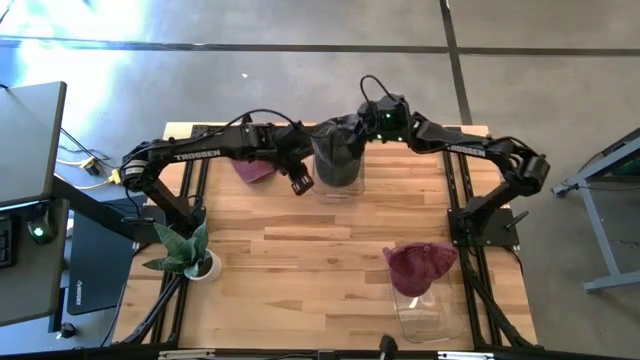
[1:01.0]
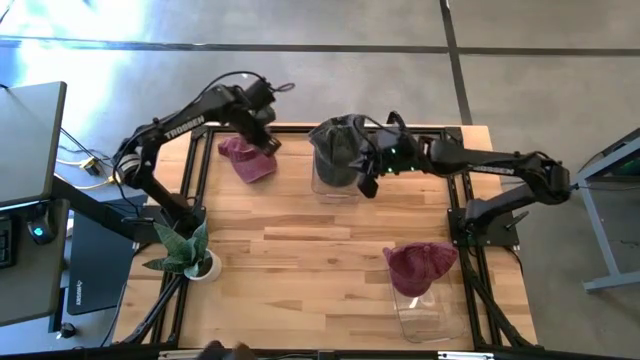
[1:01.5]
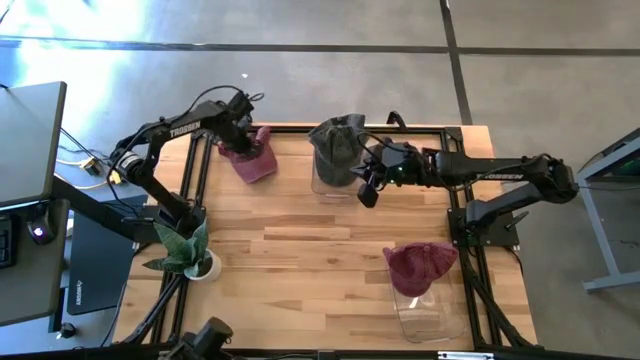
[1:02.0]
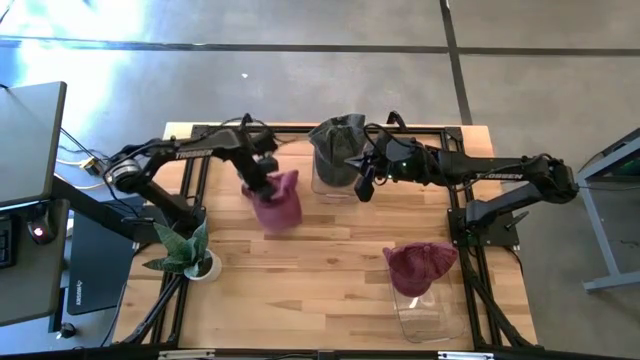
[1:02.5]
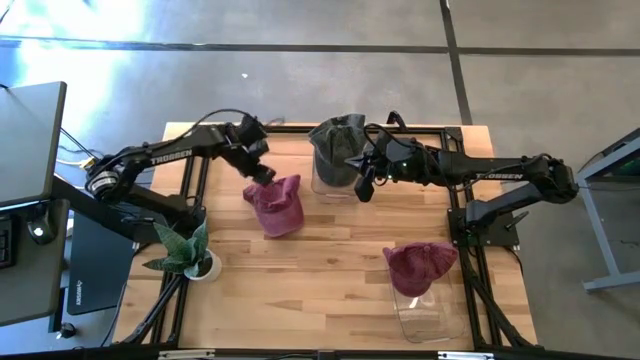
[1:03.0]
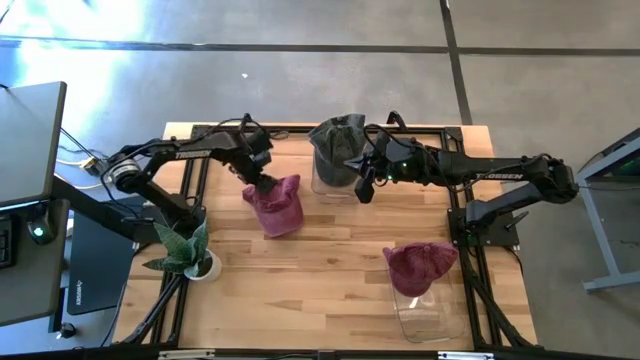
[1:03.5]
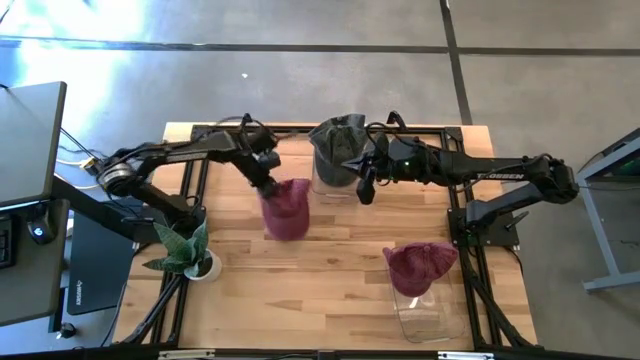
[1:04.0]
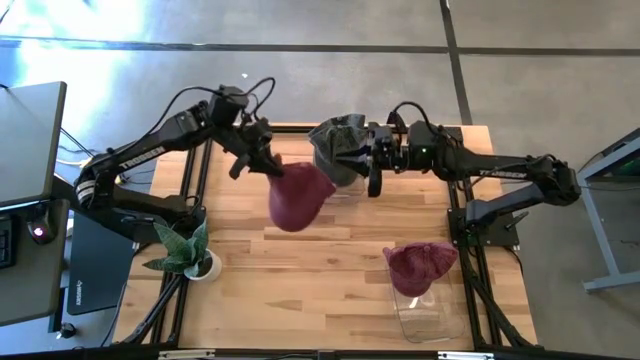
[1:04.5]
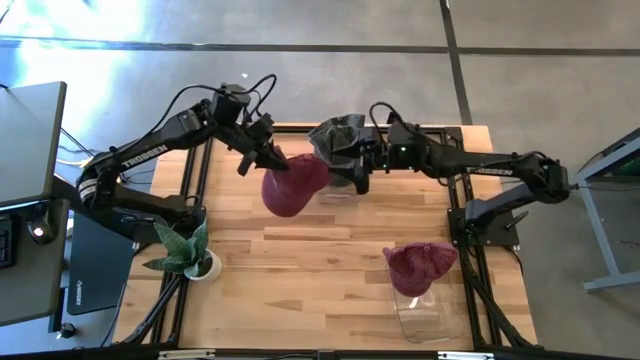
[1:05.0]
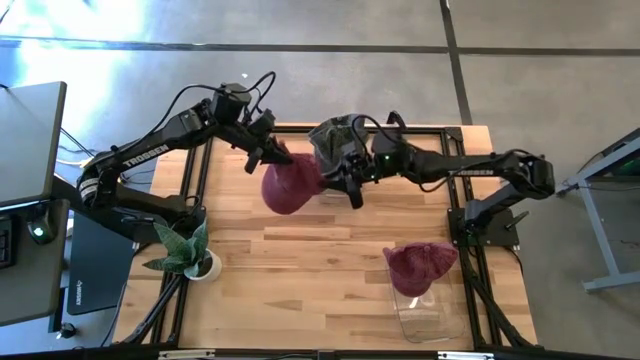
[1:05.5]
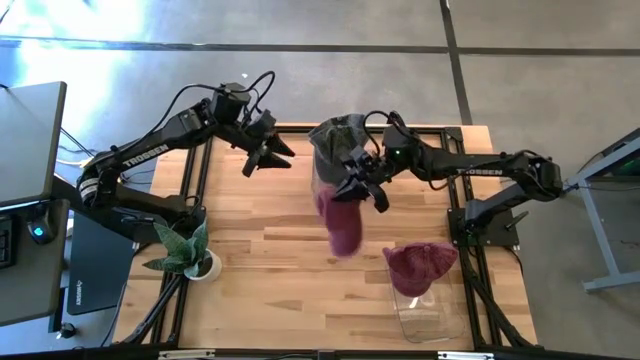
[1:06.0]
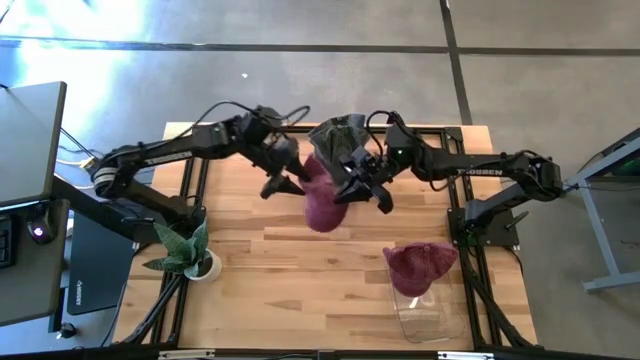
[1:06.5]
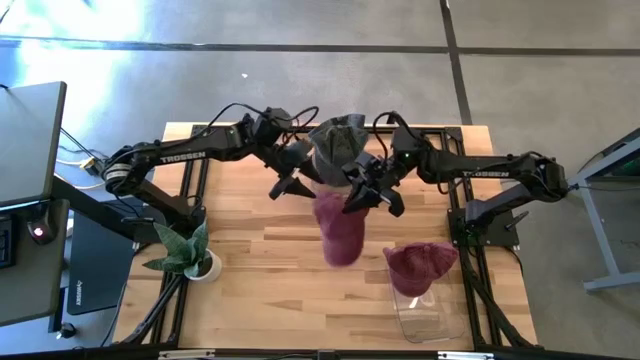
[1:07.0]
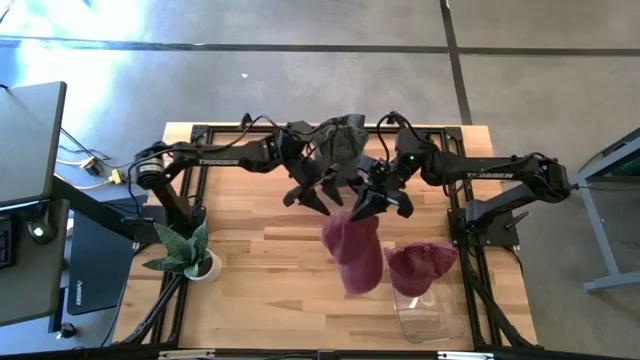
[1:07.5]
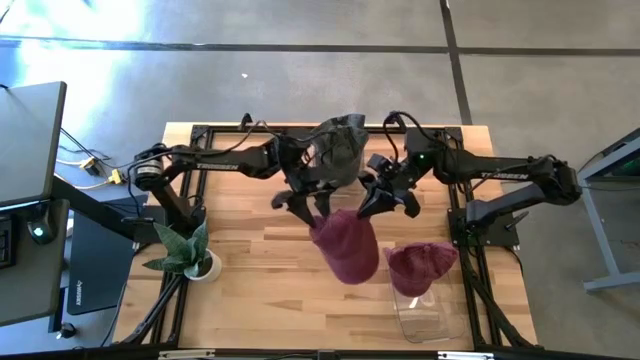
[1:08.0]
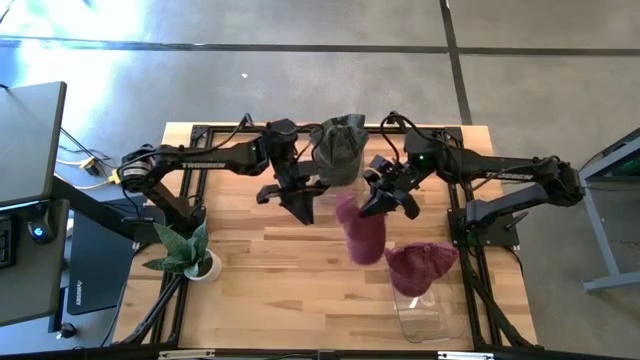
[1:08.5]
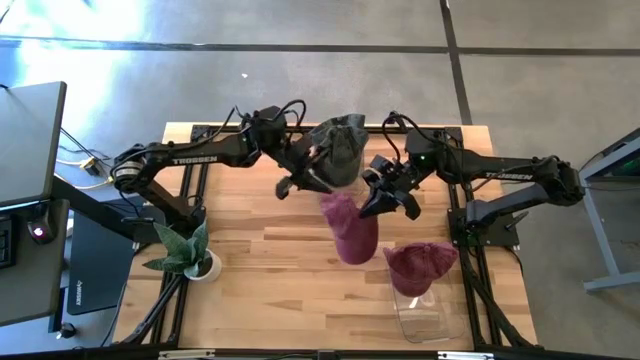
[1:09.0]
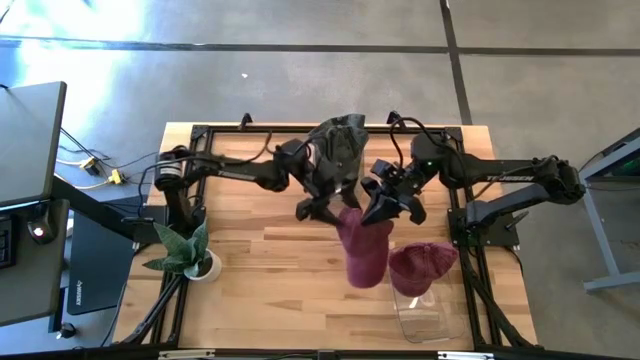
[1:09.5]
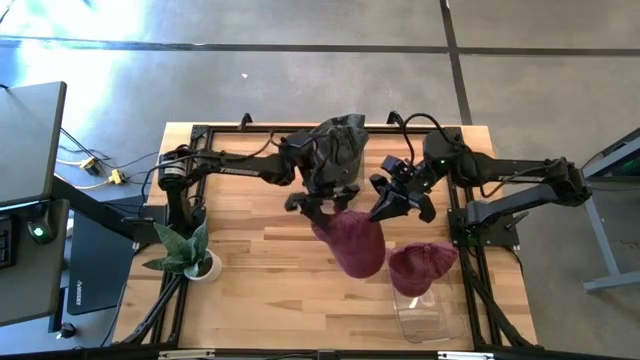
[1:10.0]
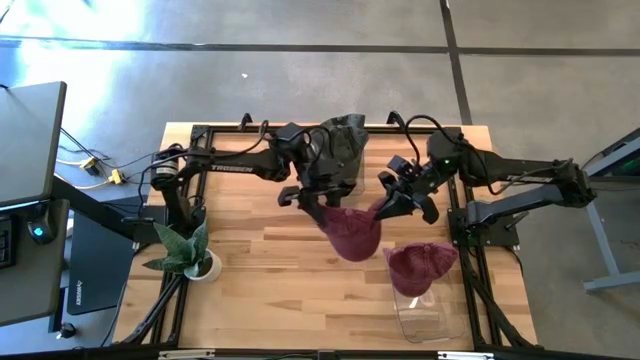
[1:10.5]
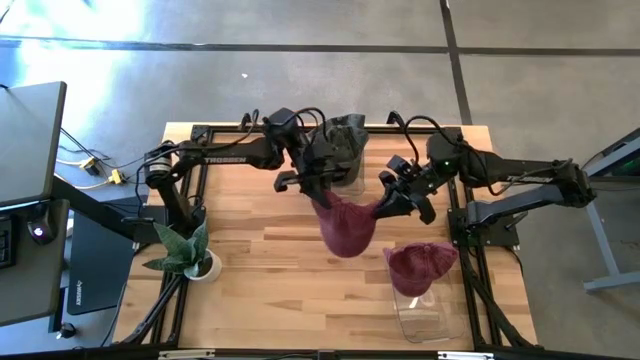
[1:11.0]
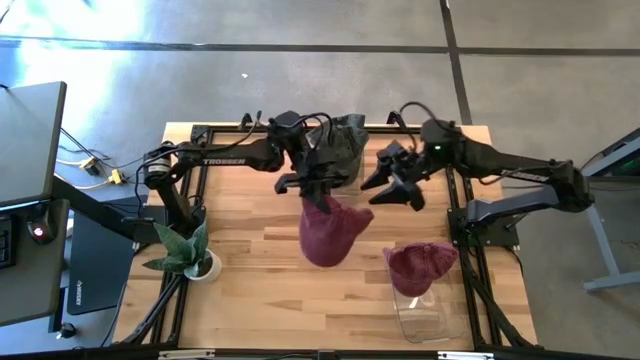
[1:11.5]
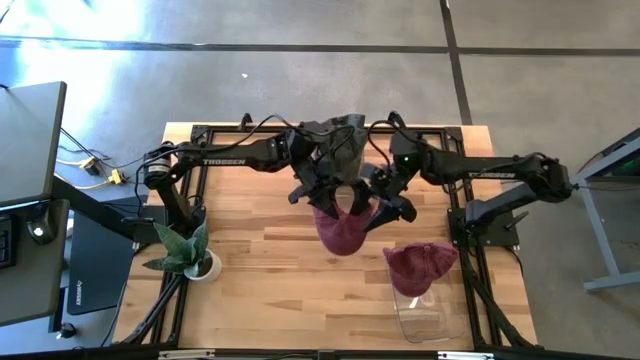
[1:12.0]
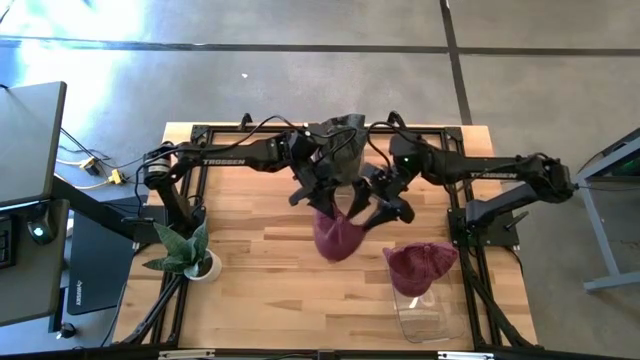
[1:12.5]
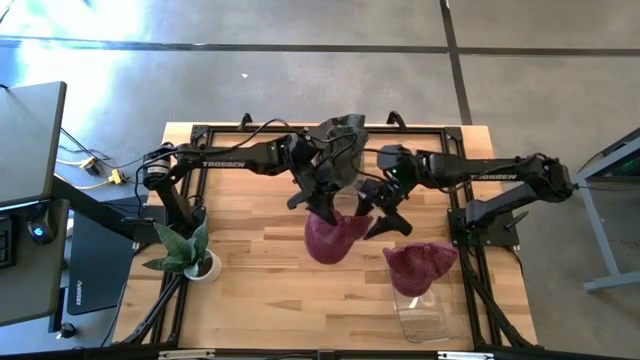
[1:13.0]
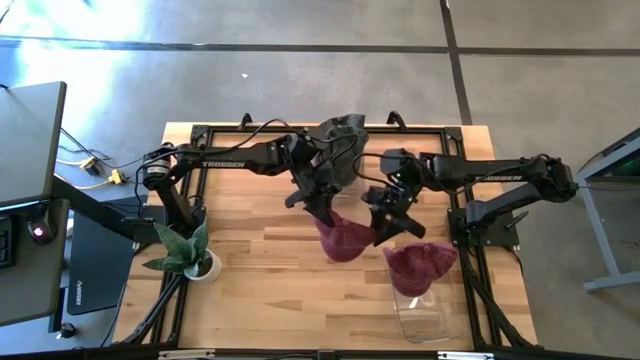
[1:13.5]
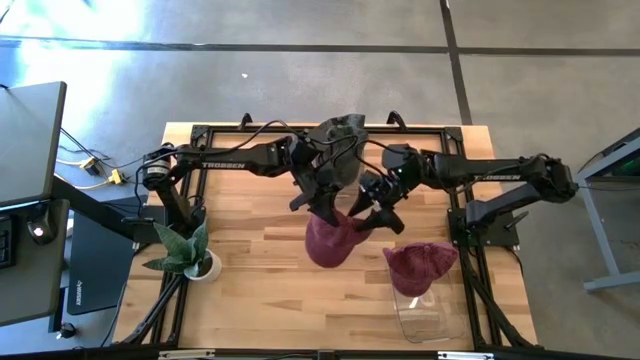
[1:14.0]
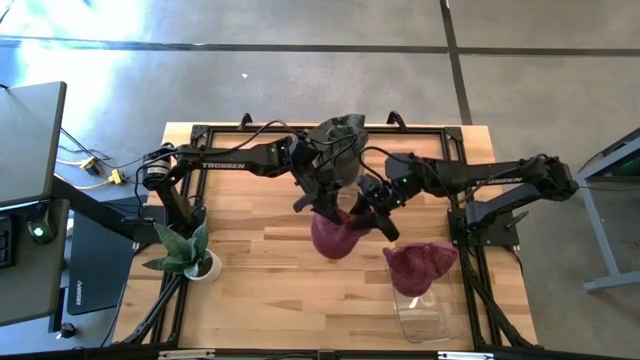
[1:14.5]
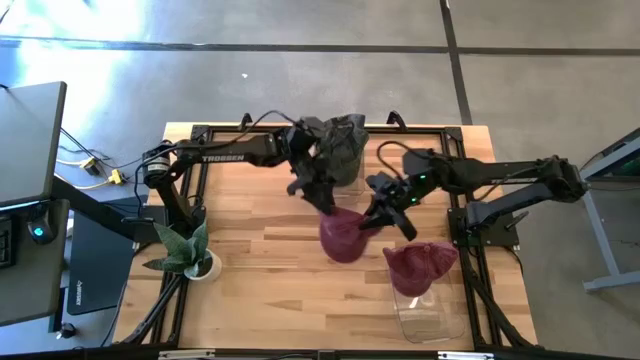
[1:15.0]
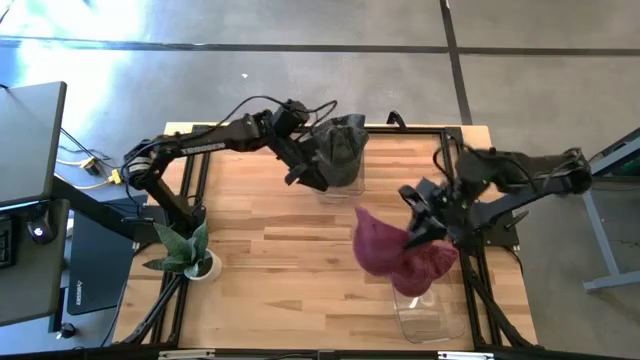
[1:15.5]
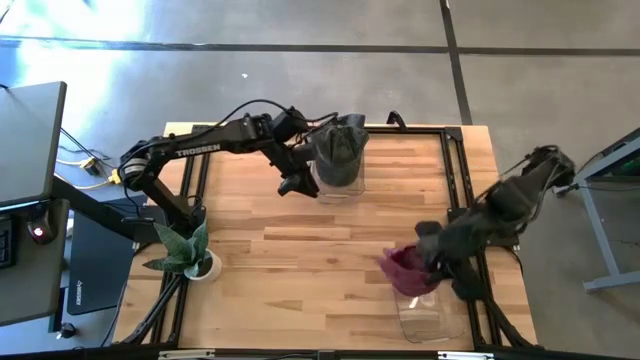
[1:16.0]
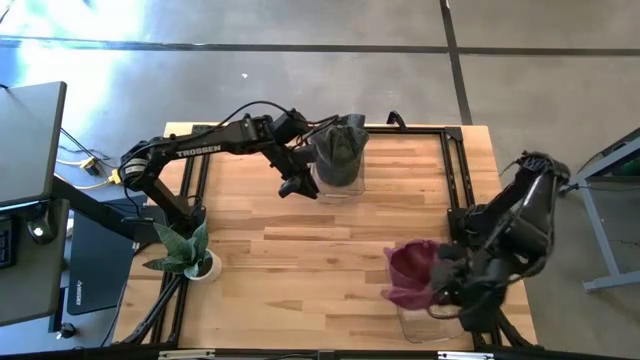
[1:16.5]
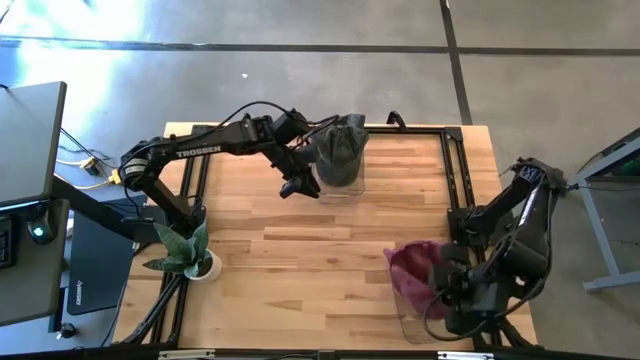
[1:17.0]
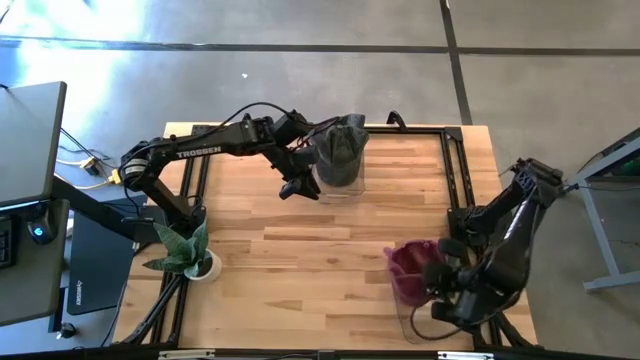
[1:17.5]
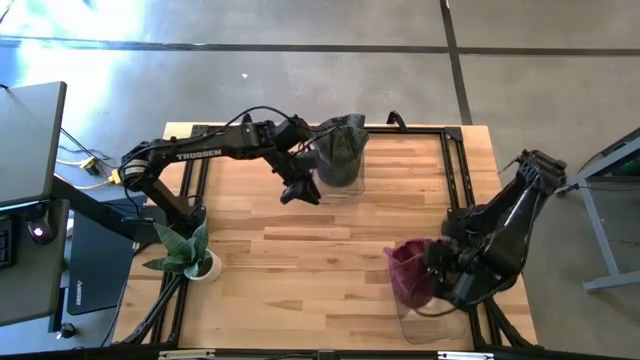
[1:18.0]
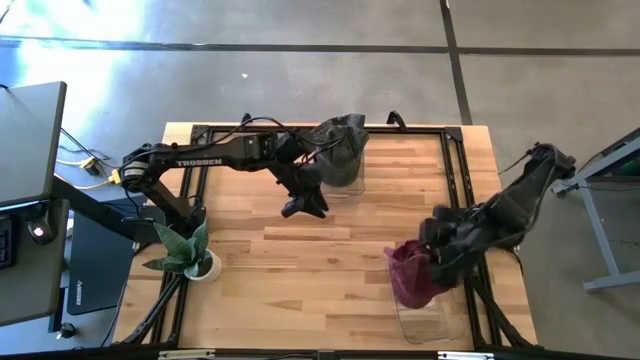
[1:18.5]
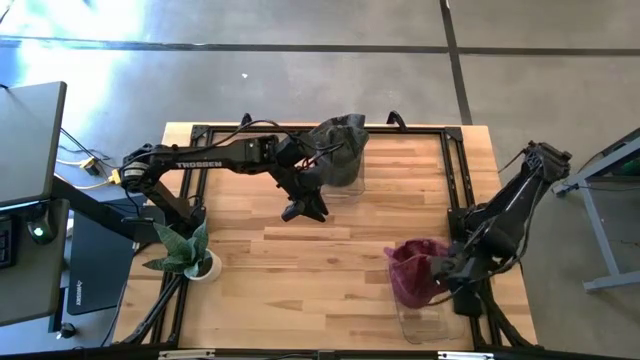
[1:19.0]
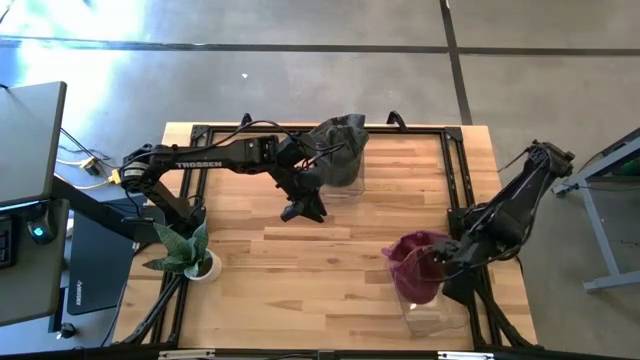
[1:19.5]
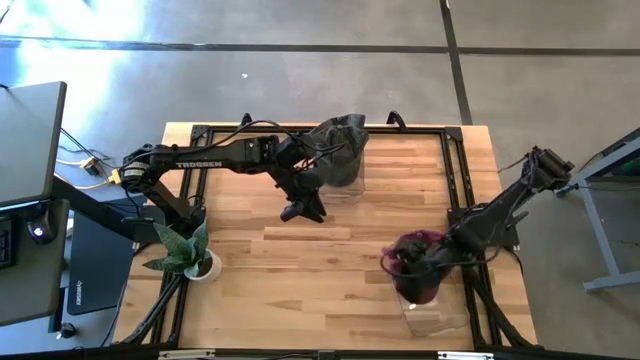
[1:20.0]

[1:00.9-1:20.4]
Task: Pick & Place hat
Put the red cap into the bottom transparent bin

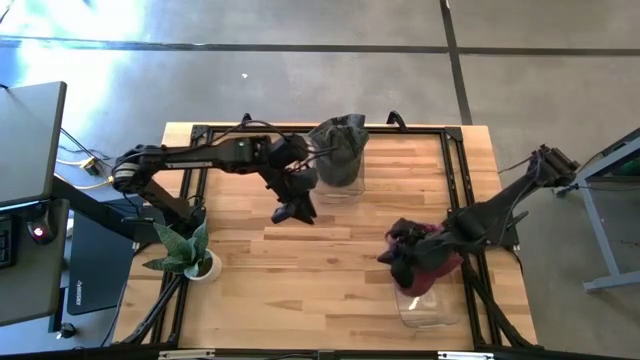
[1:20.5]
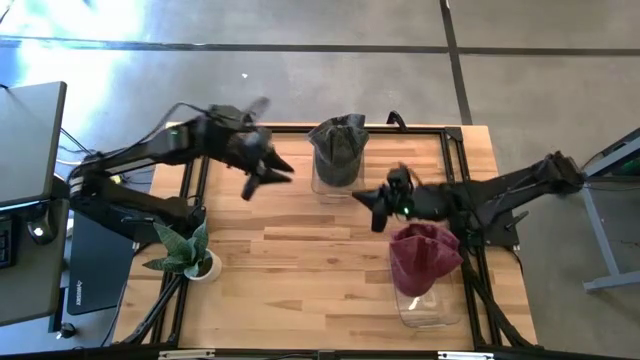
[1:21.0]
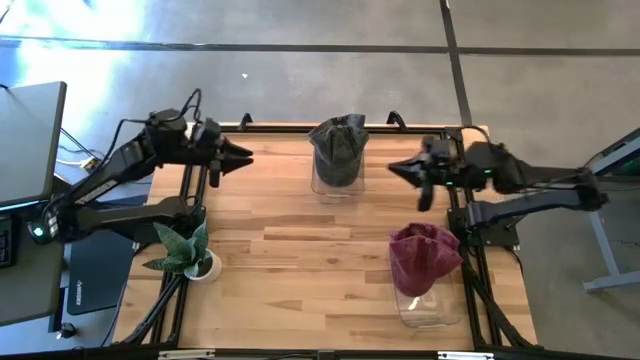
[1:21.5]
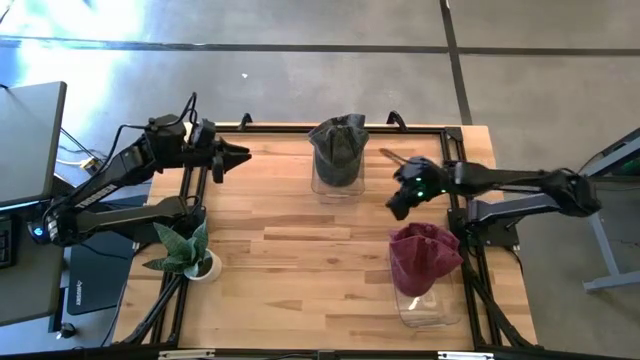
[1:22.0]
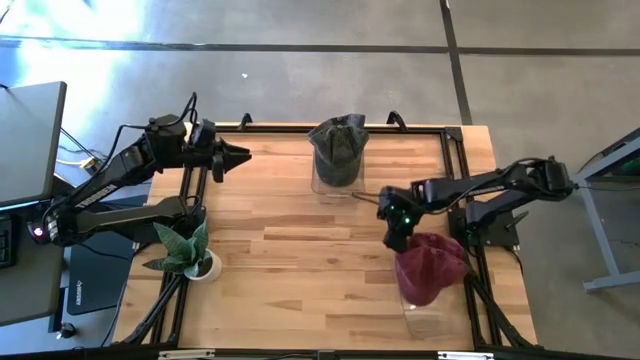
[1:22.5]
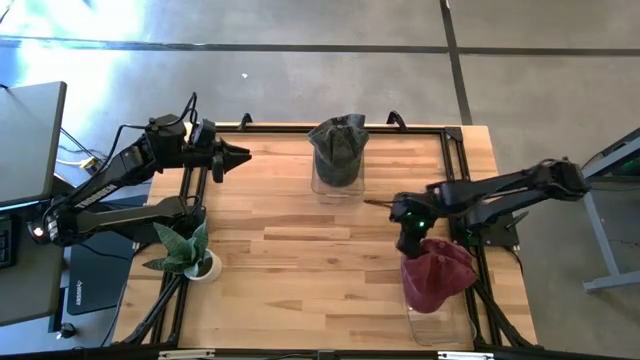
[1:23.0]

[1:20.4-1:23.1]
Adjust the bottom transparent bin

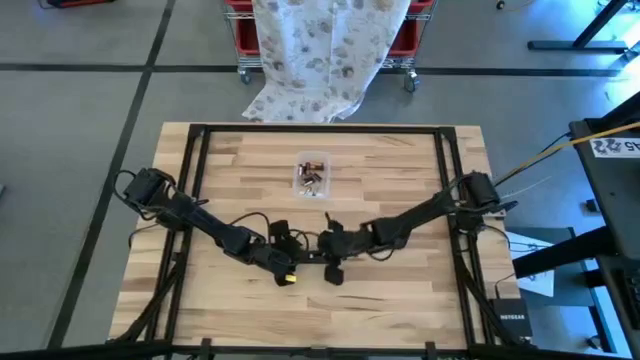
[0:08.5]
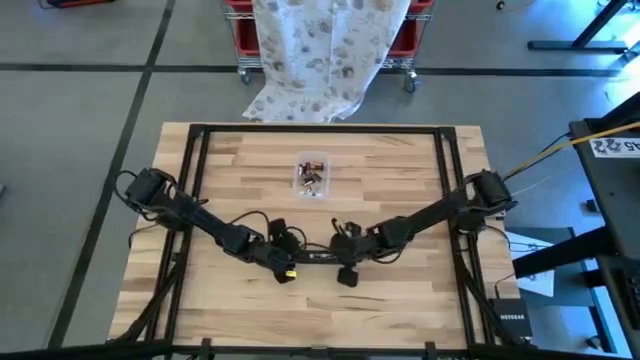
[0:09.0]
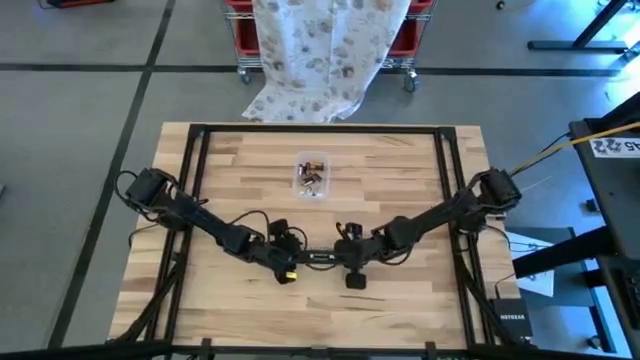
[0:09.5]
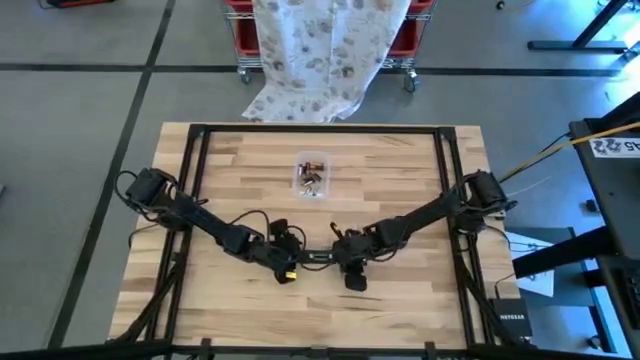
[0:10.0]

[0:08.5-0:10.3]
Task: Insert battery
Open the remote control cover
